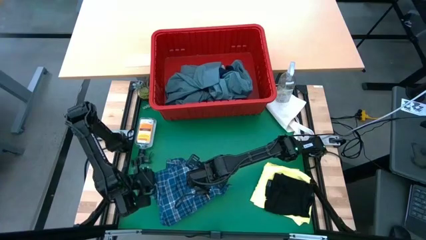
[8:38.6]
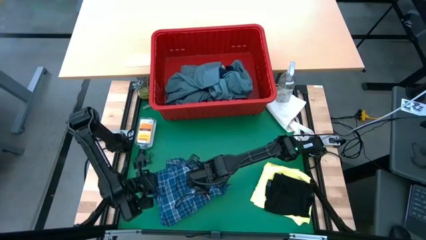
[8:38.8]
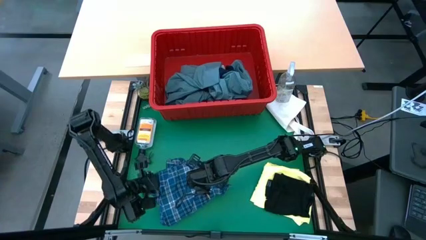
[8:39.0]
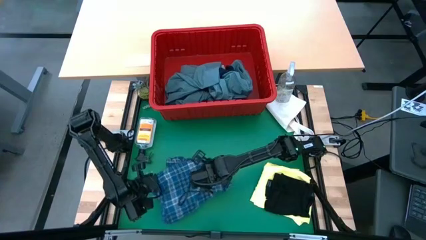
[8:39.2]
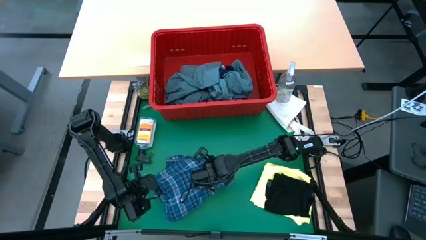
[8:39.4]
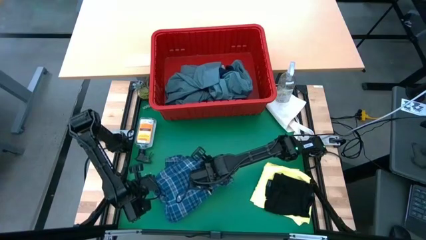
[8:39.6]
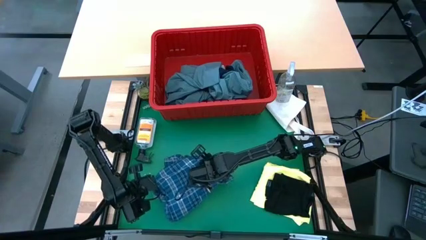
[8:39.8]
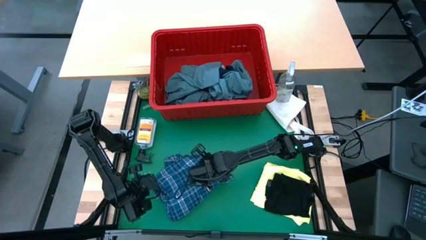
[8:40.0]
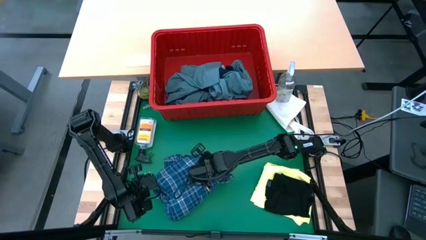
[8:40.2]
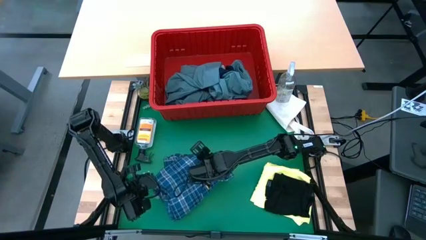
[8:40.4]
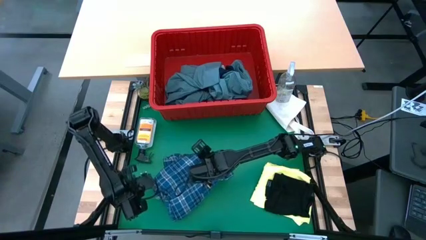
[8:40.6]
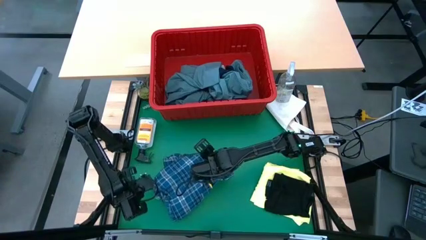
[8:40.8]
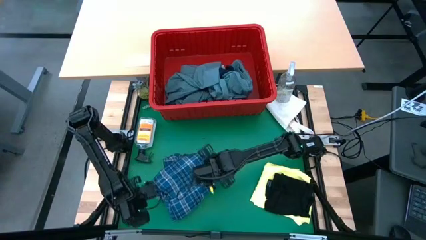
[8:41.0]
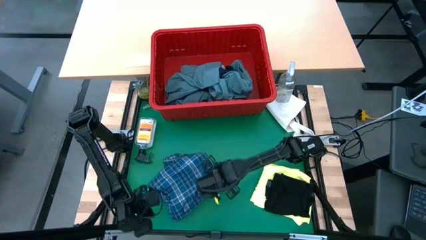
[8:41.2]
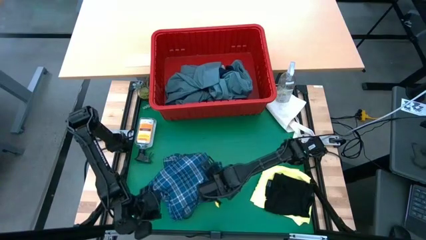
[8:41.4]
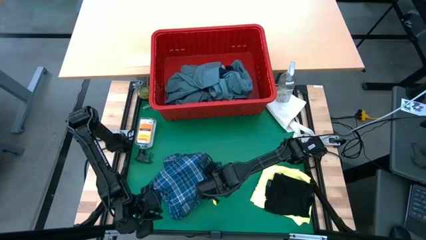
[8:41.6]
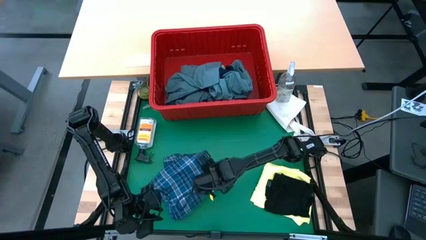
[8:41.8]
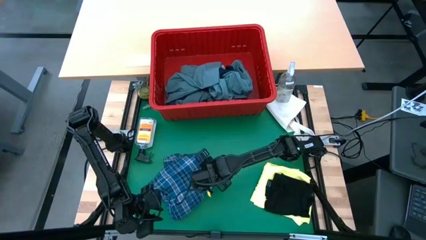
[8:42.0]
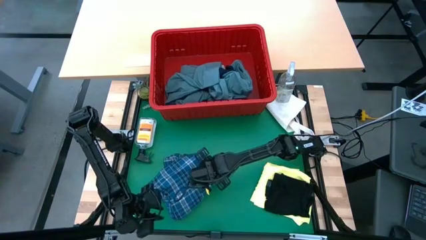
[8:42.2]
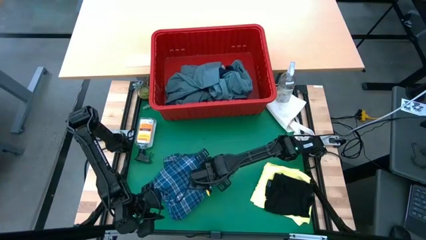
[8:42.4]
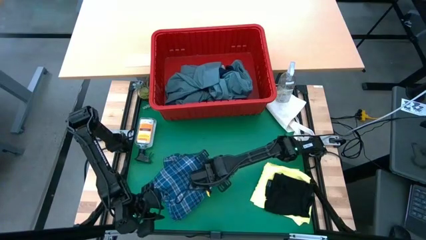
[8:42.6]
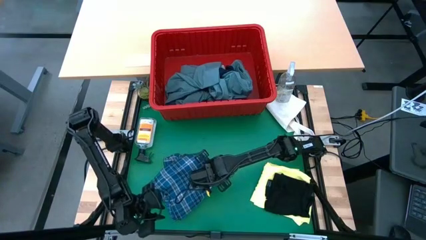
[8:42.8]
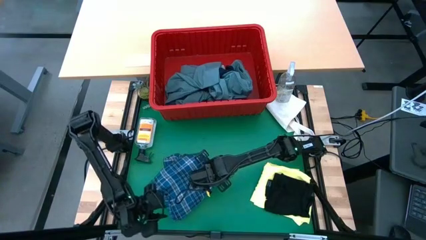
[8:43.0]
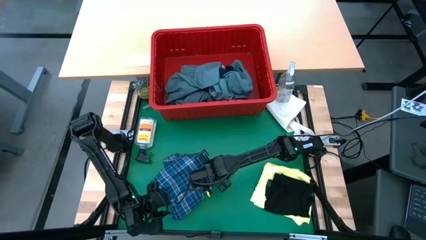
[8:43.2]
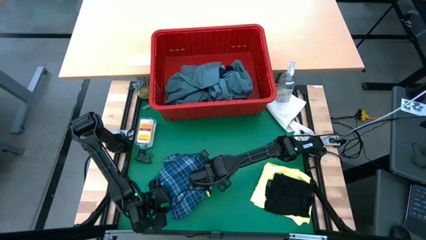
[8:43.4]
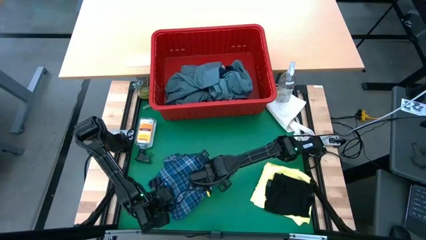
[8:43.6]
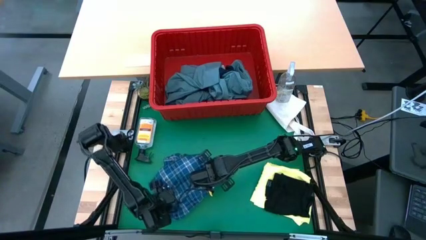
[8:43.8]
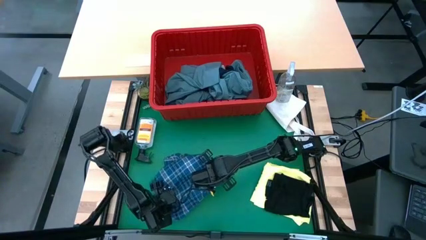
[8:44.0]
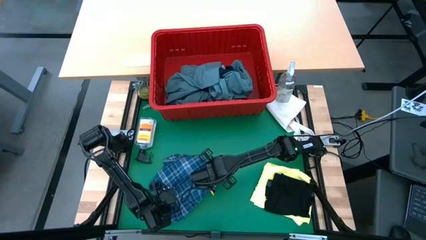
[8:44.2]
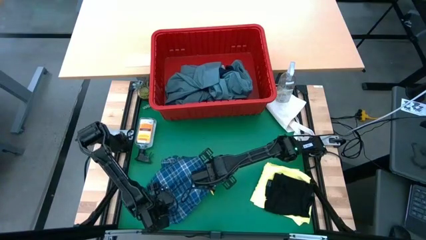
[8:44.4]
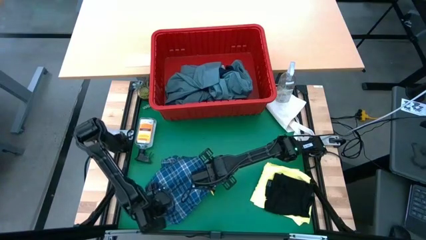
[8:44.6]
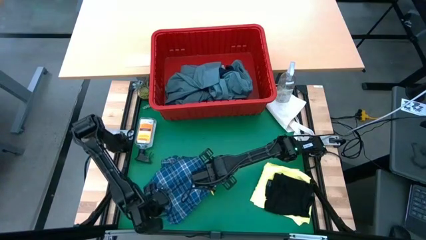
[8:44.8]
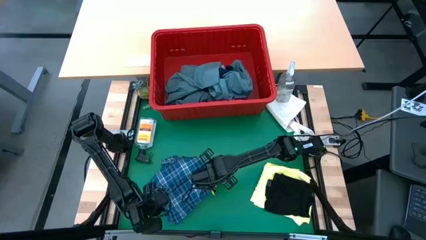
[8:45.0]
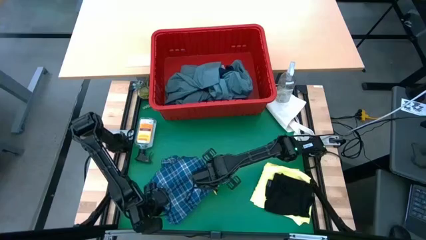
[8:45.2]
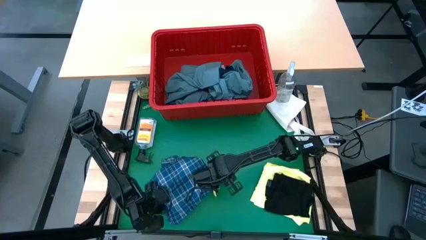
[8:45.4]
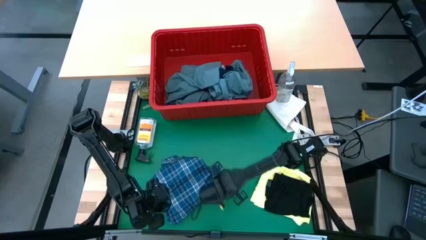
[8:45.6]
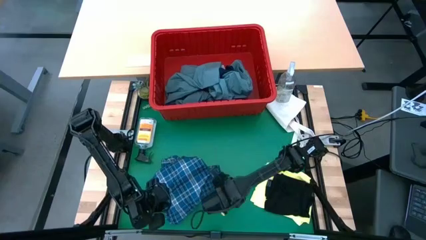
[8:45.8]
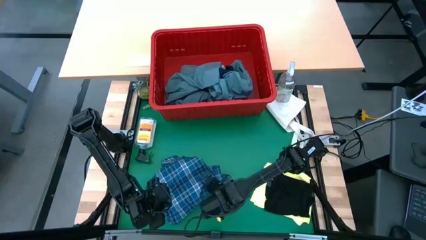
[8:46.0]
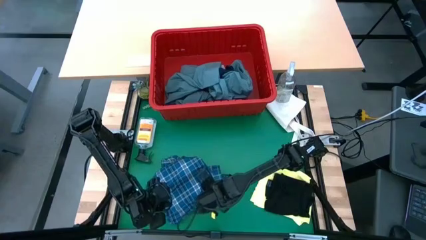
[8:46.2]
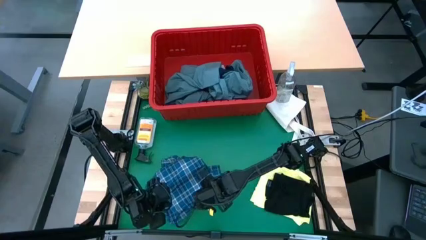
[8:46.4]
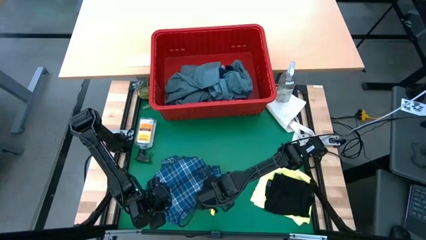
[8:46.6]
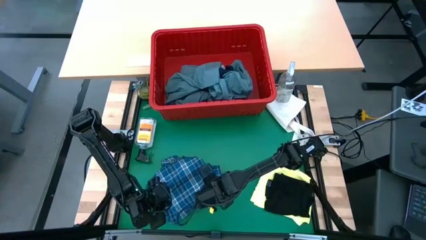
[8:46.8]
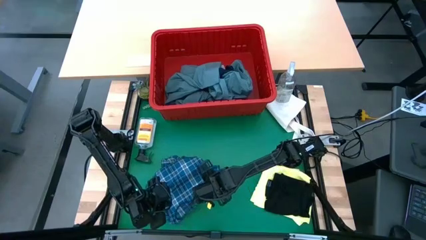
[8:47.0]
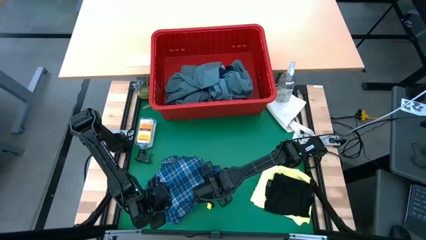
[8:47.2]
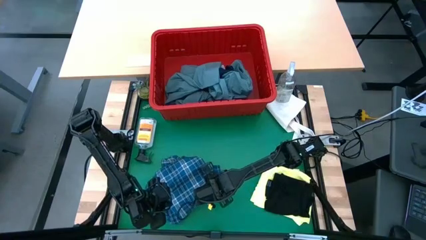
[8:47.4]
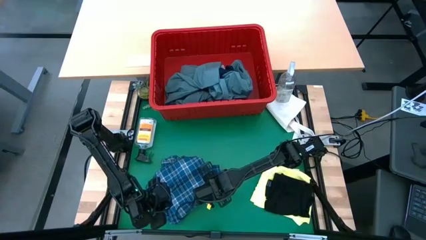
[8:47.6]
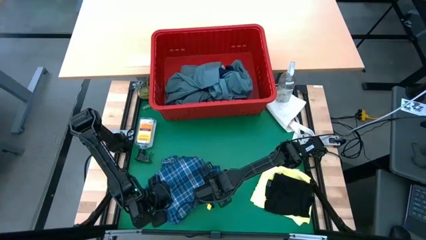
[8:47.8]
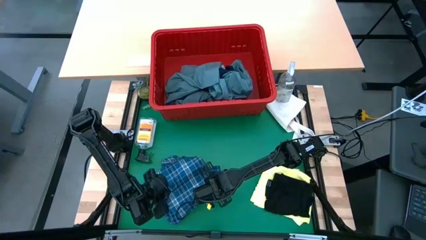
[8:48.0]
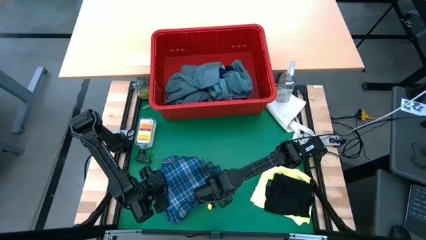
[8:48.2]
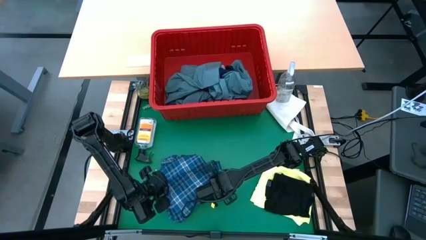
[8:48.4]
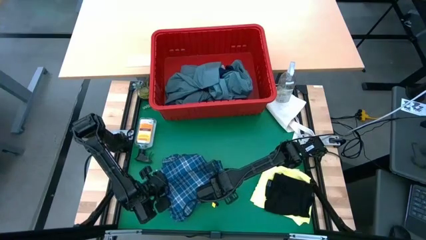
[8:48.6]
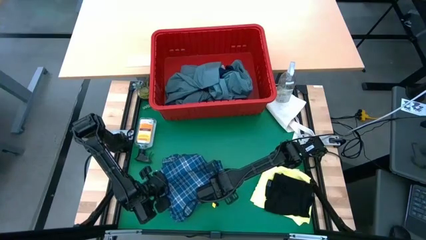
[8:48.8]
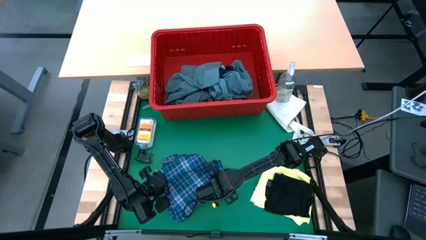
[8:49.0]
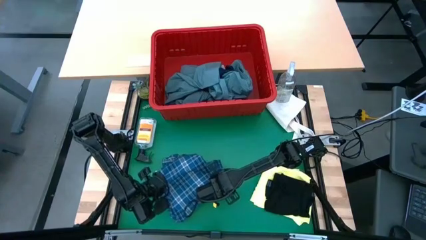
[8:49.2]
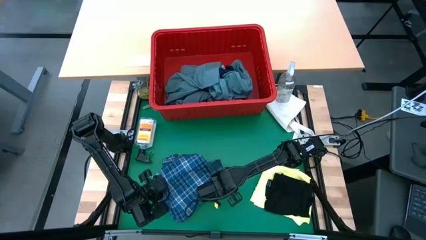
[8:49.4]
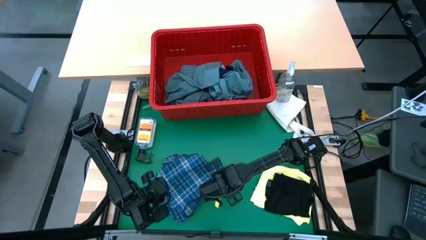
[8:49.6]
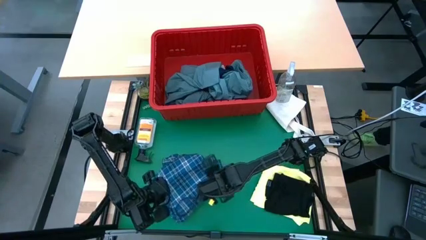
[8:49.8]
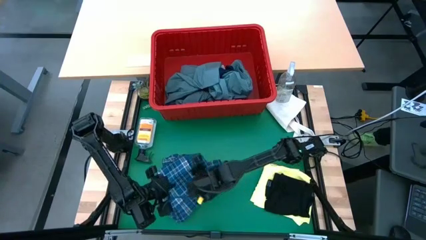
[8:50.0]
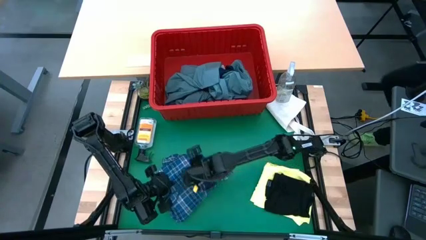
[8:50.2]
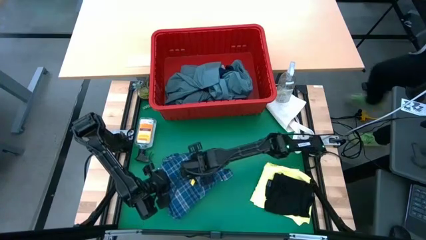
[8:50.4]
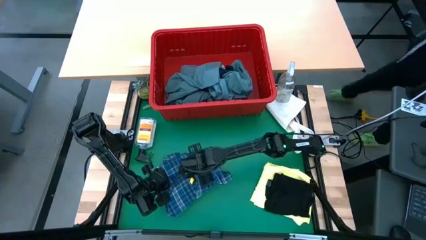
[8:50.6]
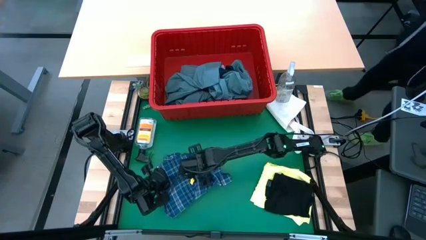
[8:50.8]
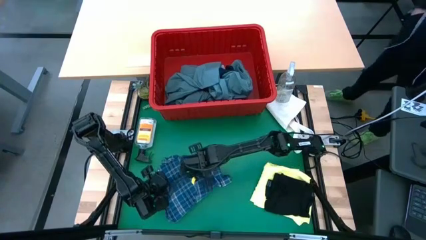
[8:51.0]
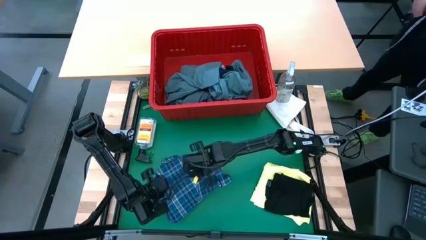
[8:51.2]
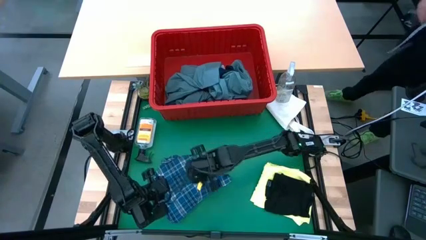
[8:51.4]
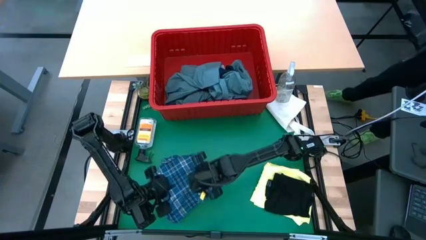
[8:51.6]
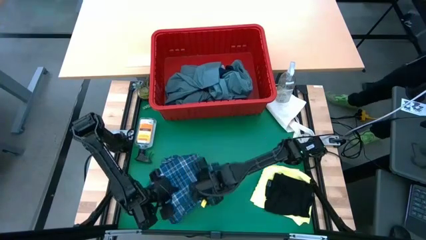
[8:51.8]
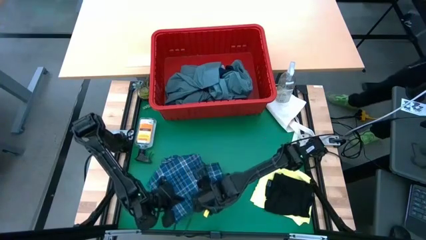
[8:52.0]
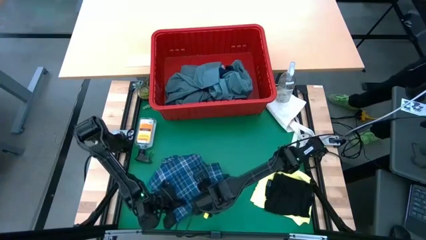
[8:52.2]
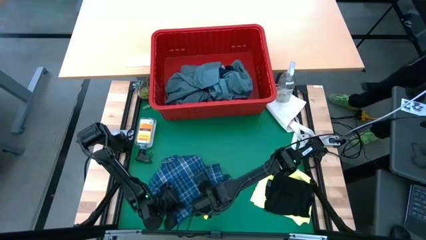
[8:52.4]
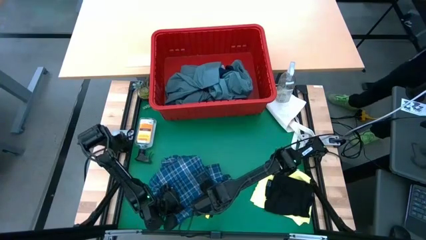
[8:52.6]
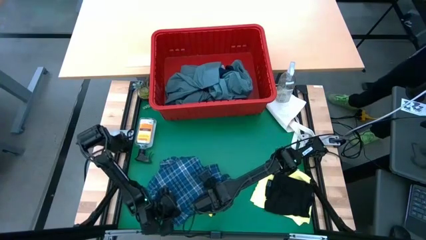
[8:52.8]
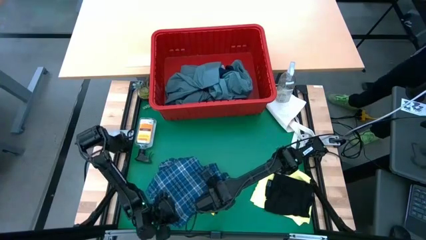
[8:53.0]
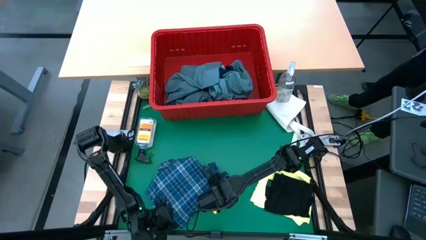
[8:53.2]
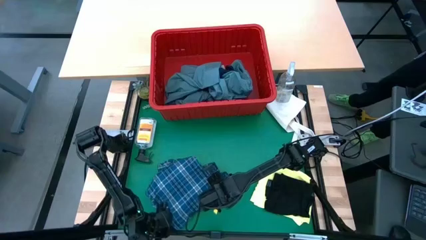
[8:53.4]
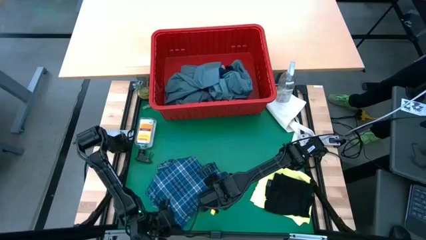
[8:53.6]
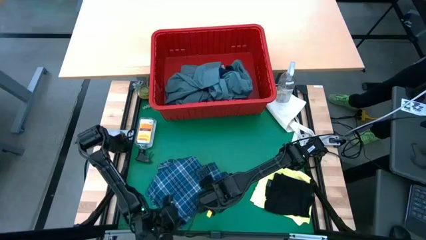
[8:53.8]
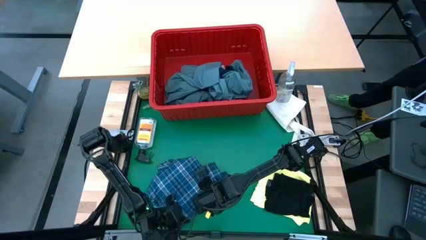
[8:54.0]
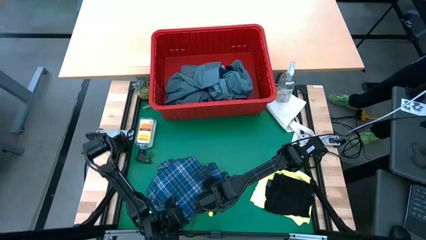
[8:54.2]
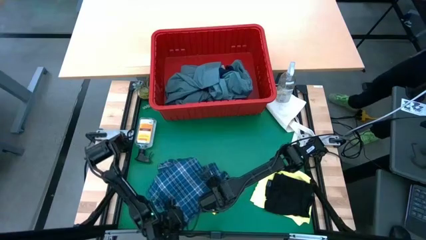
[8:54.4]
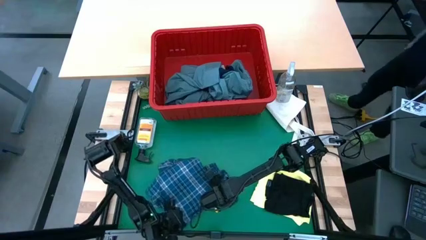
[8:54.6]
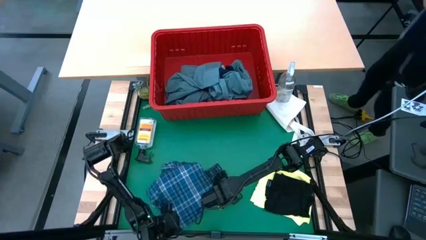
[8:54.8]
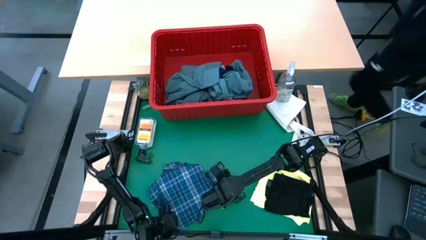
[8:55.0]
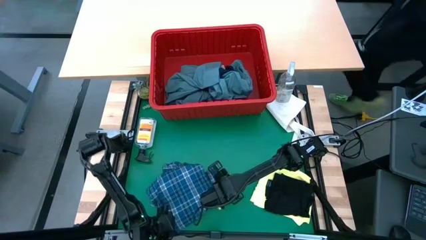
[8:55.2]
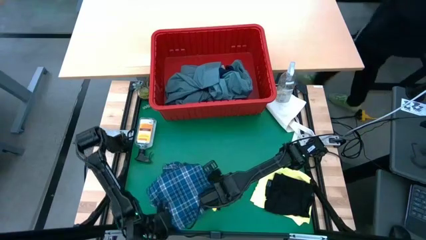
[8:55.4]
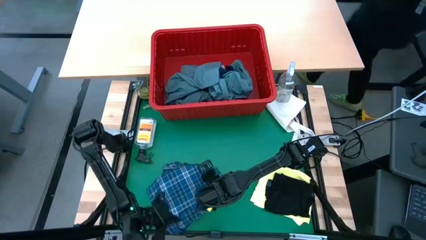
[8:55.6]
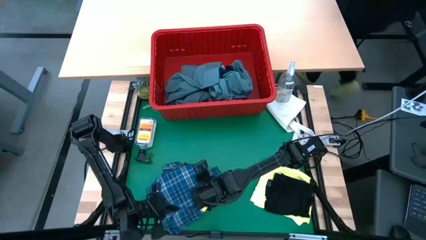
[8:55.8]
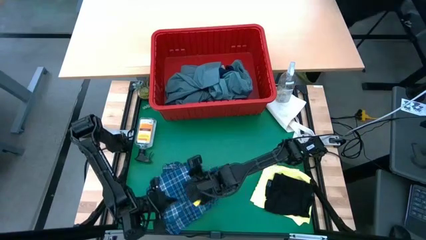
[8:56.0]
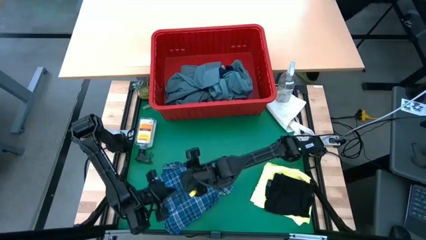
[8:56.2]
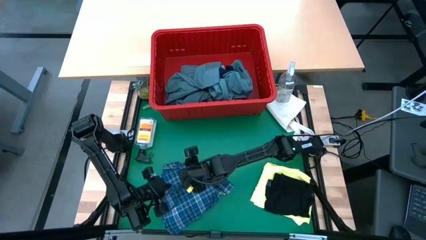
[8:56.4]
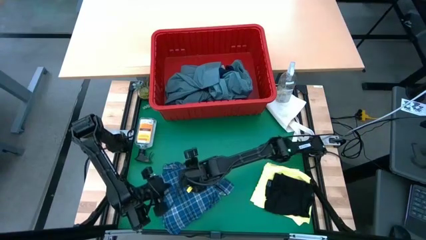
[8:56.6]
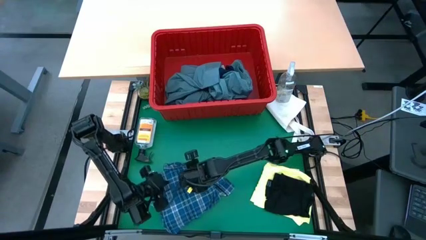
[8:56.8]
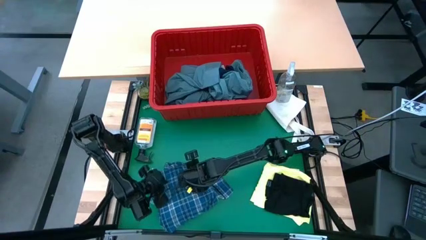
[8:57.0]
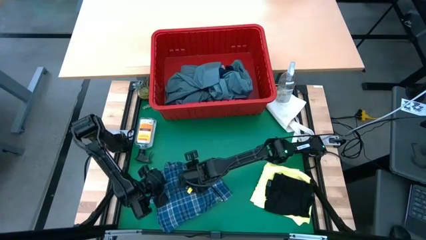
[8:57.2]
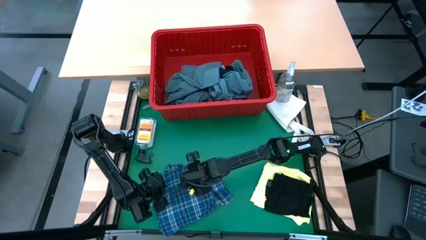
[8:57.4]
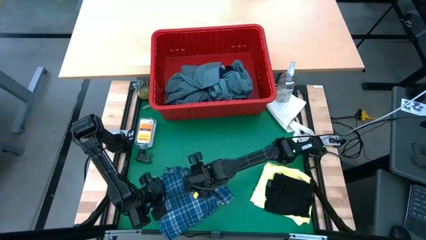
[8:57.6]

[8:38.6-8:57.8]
Task: Fold Laundry from Bin
Fold the blue shirt
